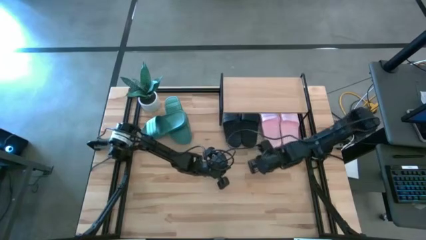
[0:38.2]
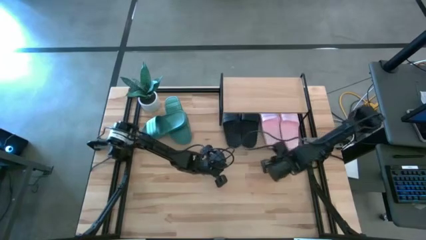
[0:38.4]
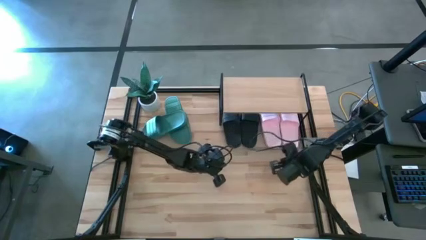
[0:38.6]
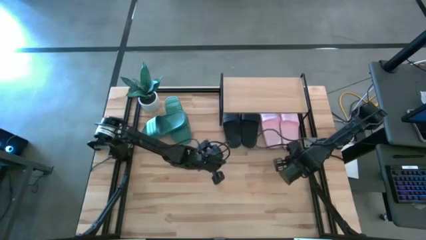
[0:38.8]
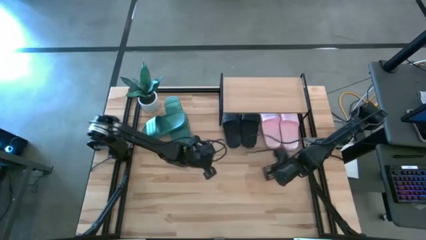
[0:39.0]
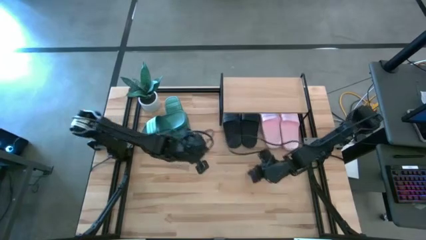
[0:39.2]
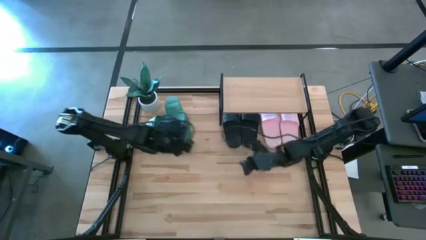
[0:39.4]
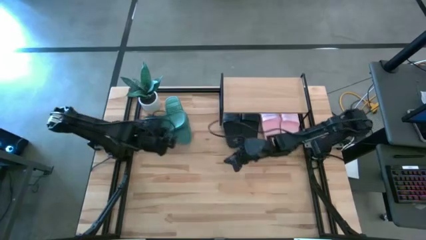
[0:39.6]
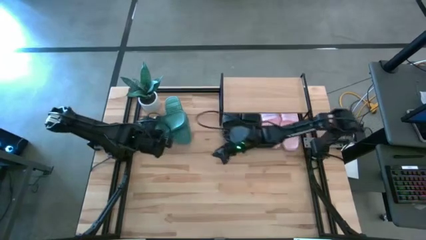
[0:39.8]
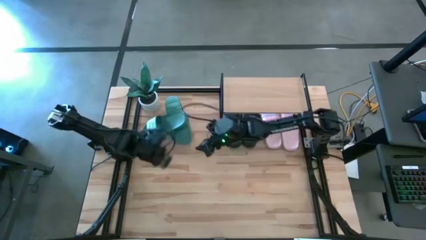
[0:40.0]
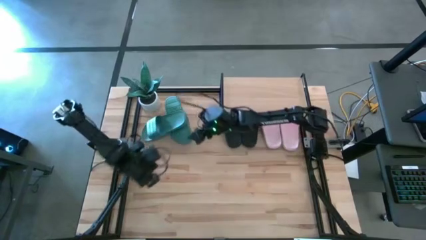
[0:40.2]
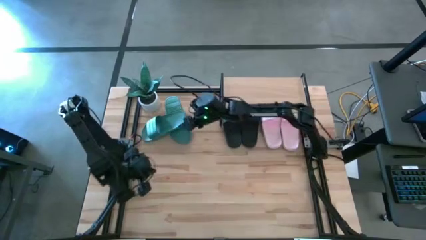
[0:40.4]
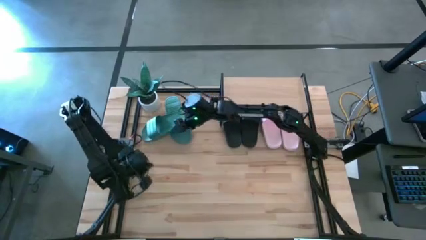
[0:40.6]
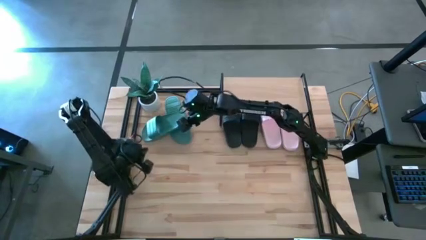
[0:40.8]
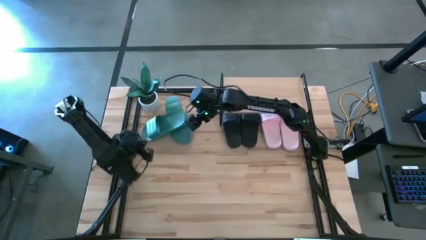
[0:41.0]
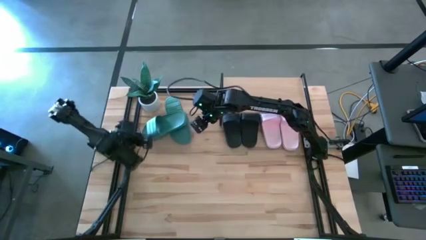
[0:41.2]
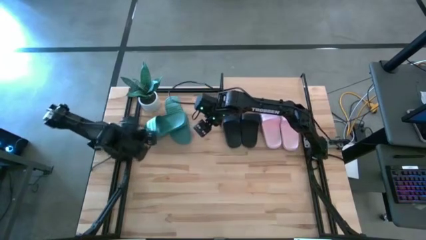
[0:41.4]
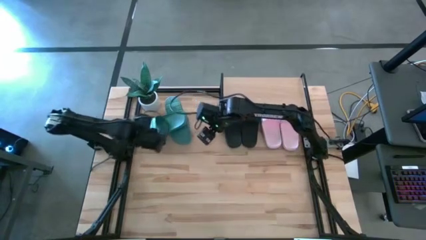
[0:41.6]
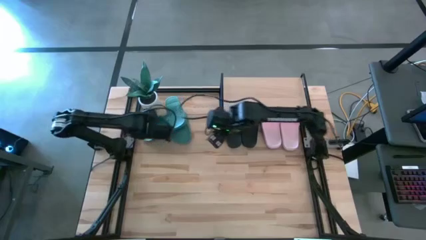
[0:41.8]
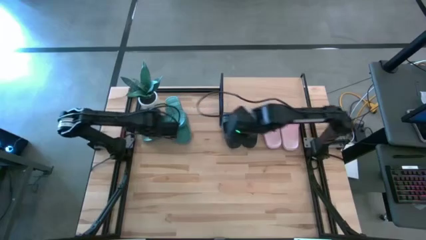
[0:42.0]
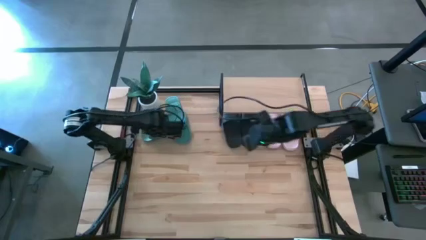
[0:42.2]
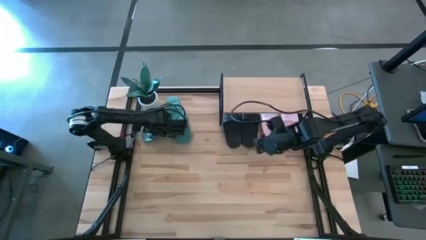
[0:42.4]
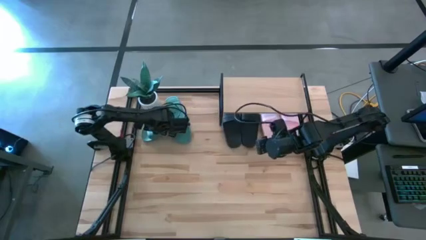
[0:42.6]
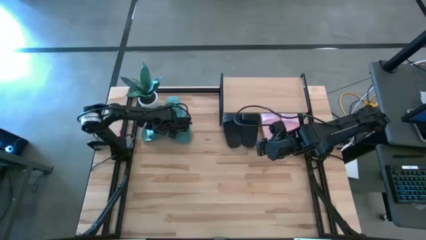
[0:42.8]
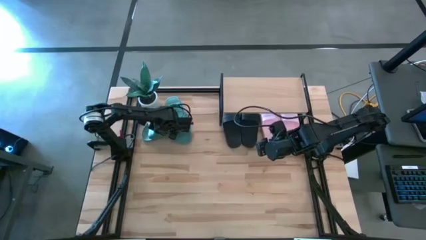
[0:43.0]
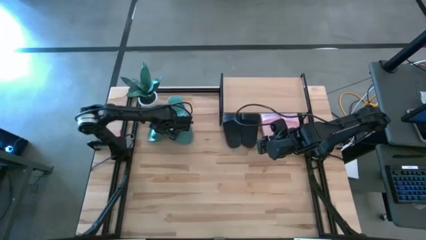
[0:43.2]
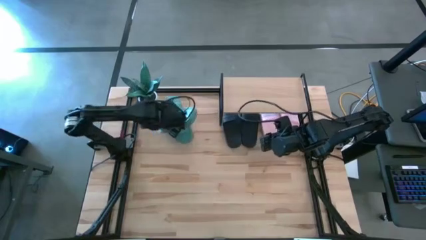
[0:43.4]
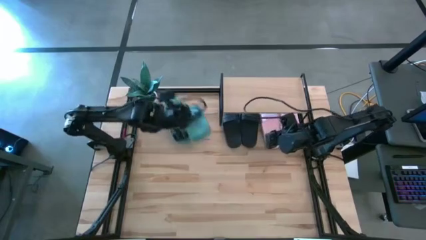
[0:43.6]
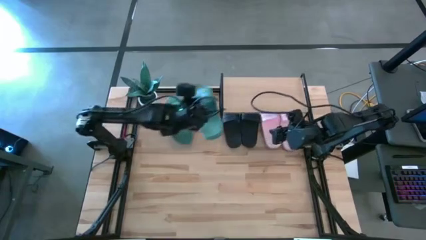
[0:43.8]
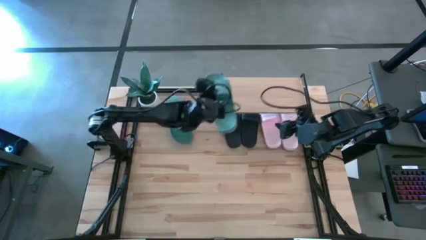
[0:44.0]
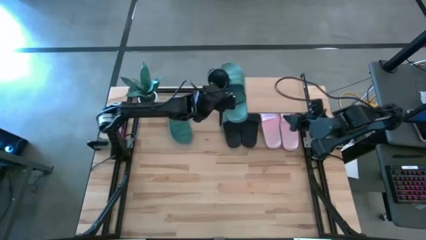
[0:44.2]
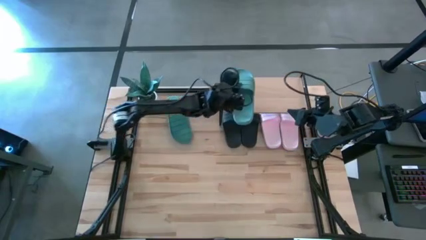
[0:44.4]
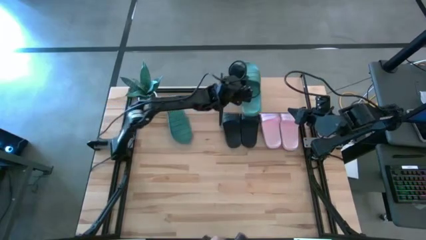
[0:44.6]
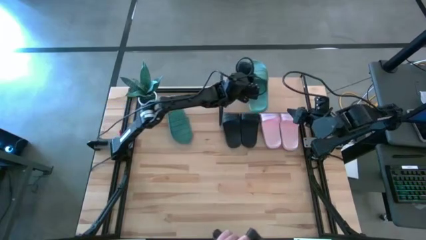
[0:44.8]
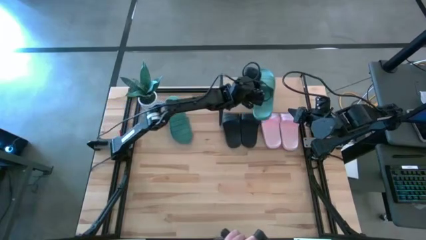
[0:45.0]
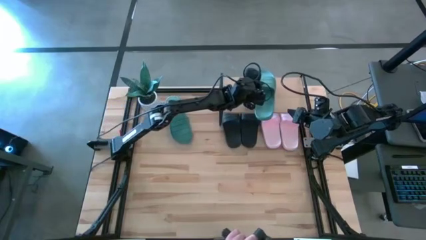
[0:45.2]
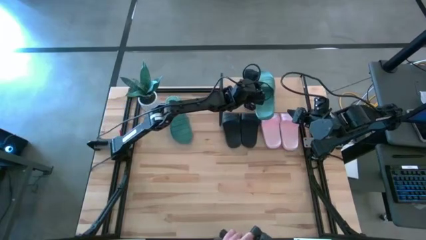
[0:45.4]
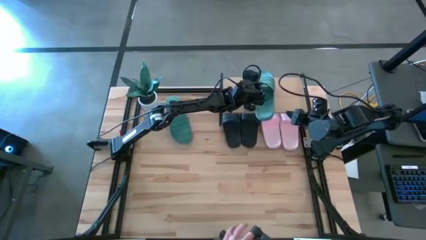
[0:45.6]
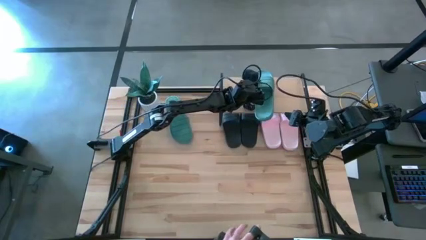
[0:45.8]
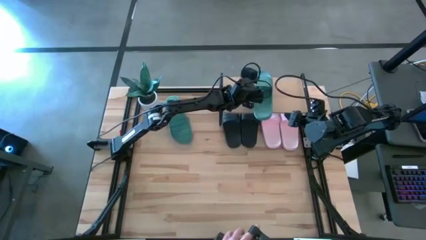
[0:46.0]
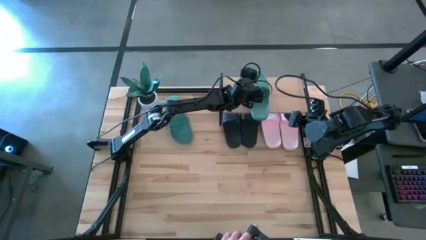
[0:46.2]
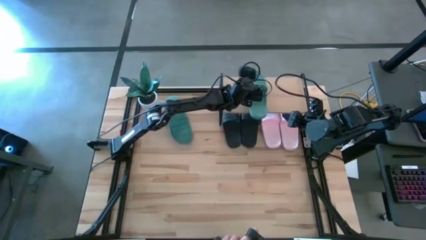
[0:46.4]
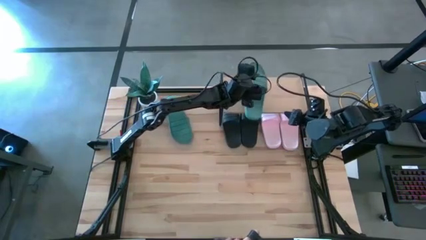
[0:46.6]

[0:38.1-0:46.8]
Task: Pick and place slides into the shelf
Put the left green slide on the shelf

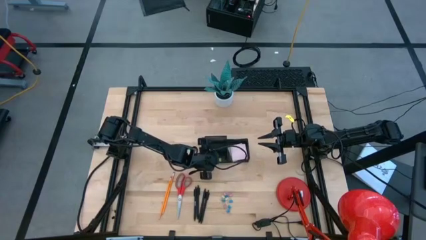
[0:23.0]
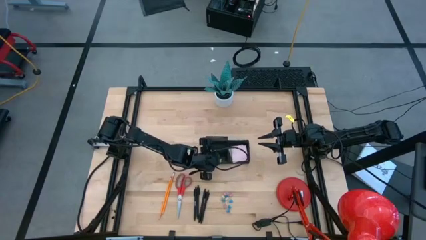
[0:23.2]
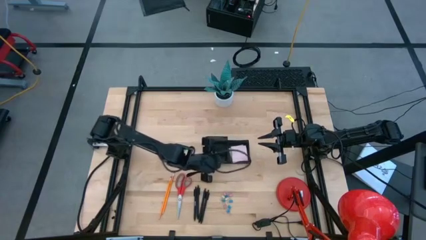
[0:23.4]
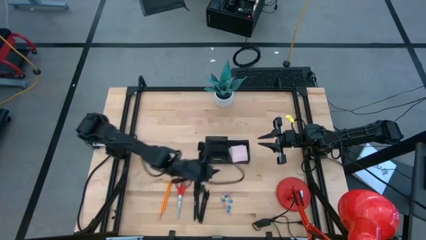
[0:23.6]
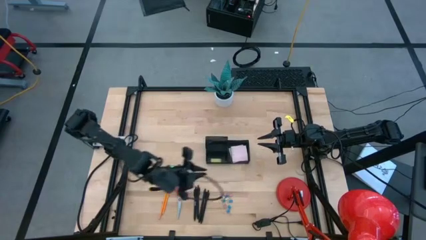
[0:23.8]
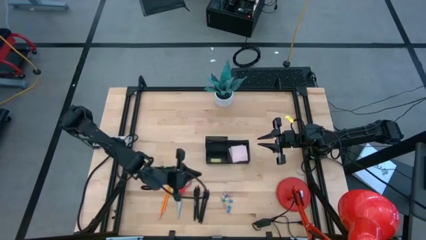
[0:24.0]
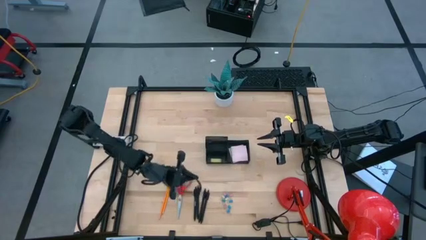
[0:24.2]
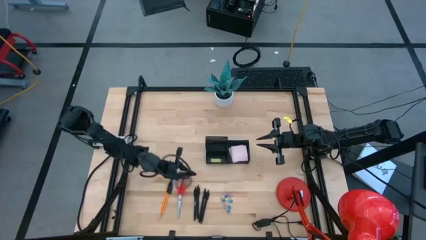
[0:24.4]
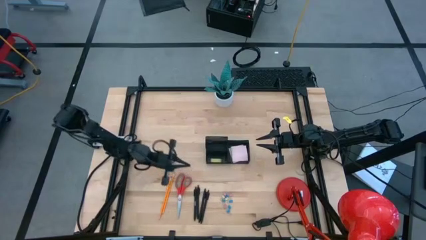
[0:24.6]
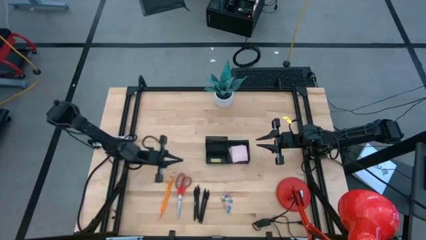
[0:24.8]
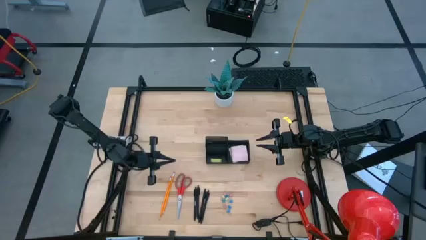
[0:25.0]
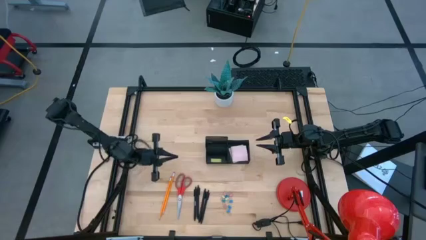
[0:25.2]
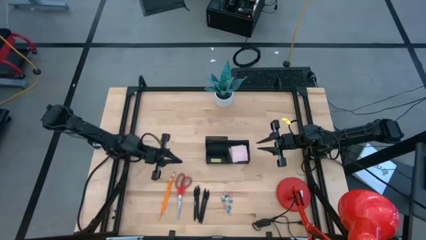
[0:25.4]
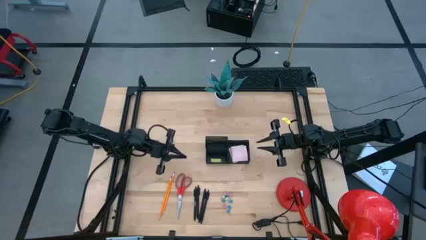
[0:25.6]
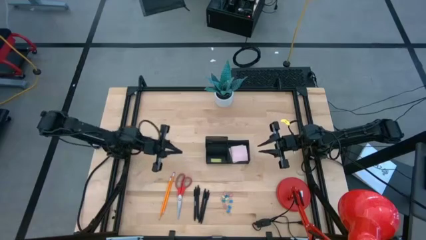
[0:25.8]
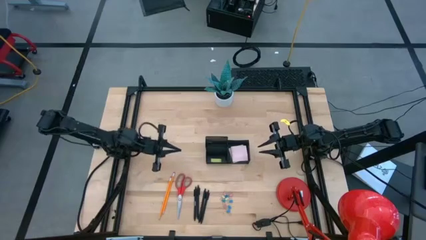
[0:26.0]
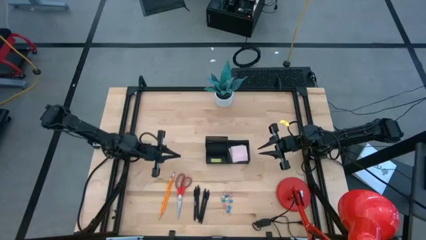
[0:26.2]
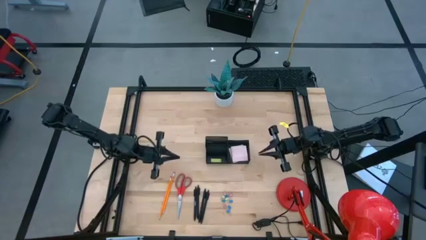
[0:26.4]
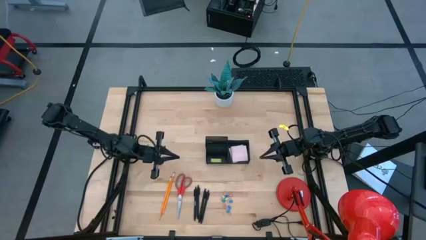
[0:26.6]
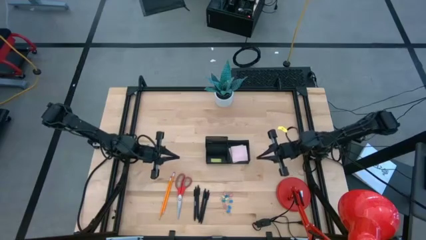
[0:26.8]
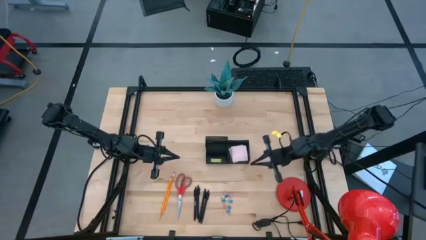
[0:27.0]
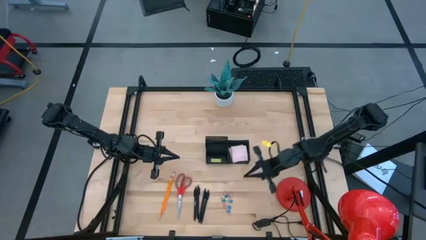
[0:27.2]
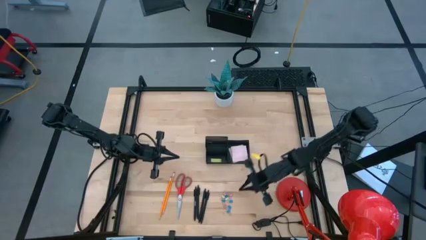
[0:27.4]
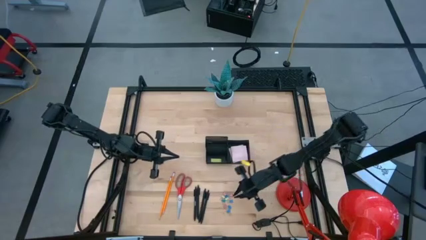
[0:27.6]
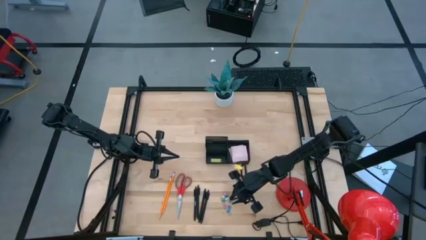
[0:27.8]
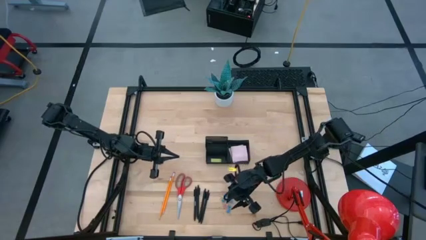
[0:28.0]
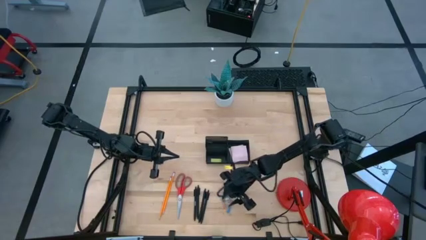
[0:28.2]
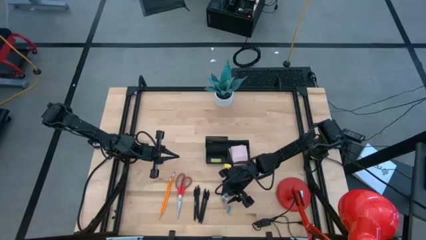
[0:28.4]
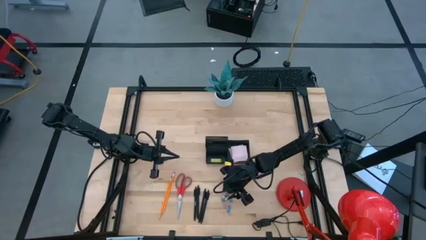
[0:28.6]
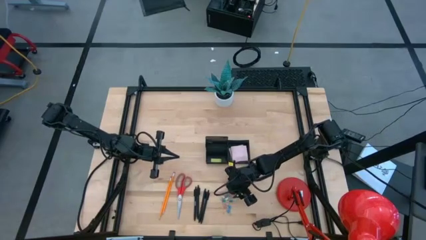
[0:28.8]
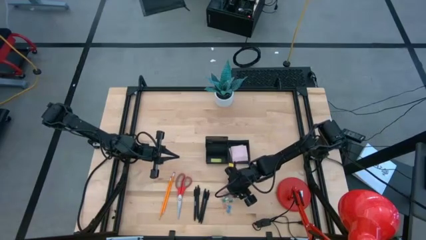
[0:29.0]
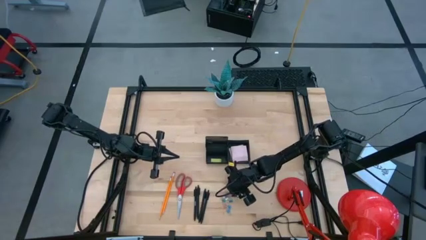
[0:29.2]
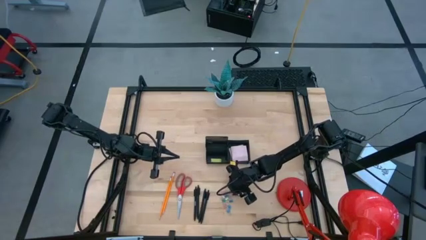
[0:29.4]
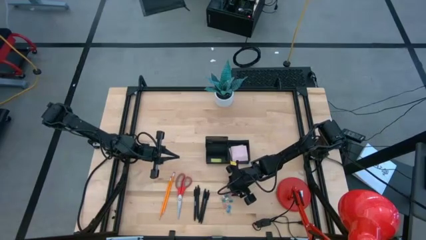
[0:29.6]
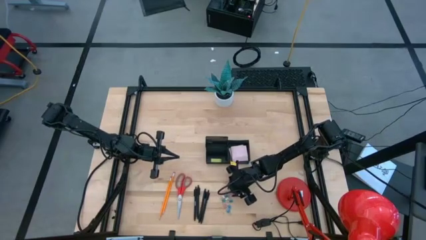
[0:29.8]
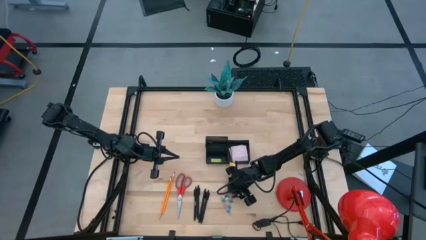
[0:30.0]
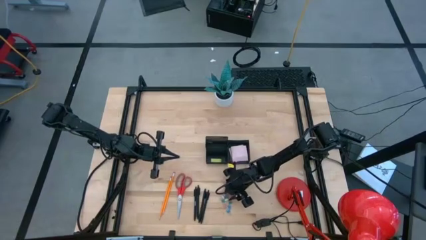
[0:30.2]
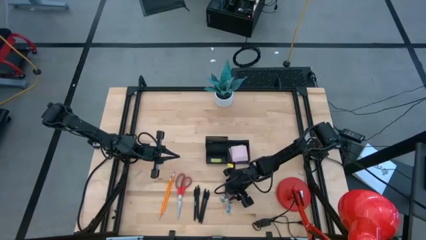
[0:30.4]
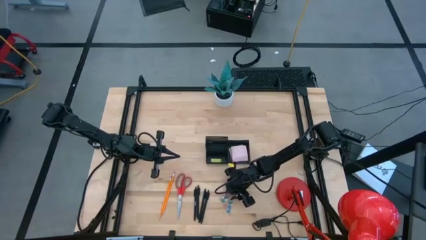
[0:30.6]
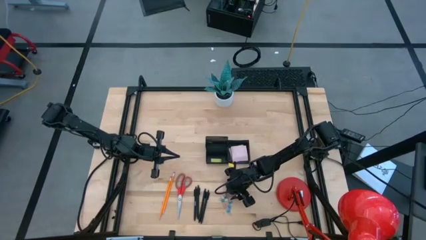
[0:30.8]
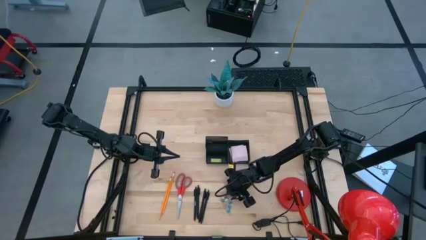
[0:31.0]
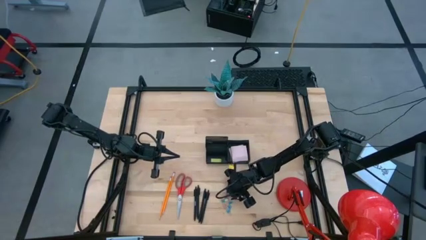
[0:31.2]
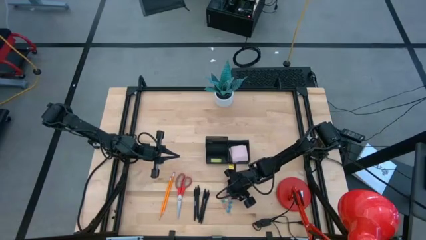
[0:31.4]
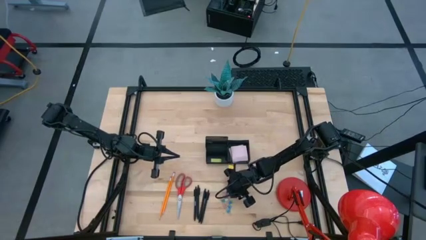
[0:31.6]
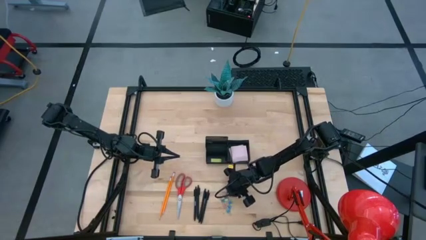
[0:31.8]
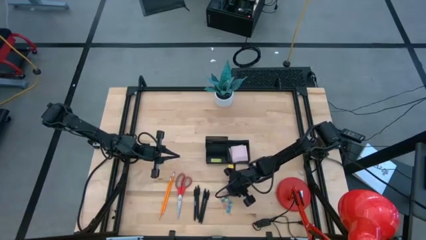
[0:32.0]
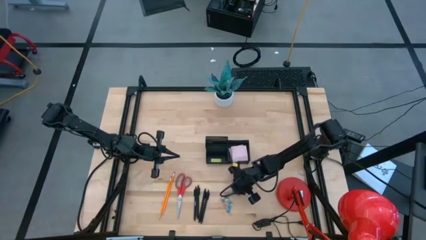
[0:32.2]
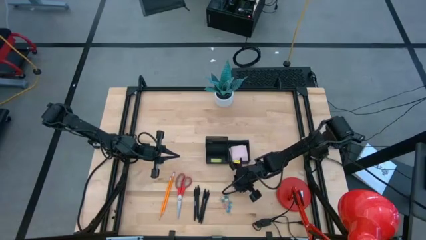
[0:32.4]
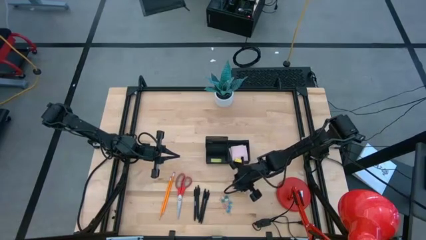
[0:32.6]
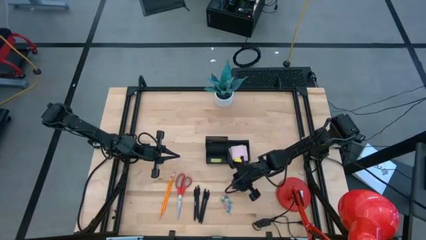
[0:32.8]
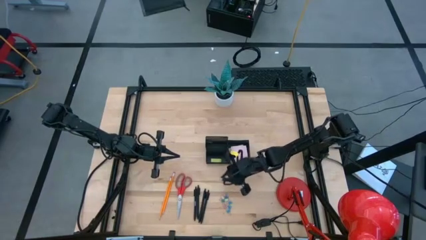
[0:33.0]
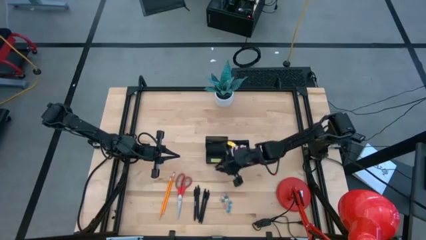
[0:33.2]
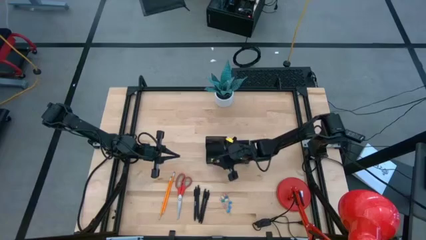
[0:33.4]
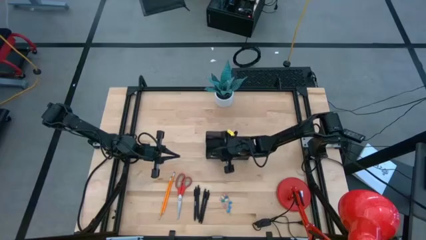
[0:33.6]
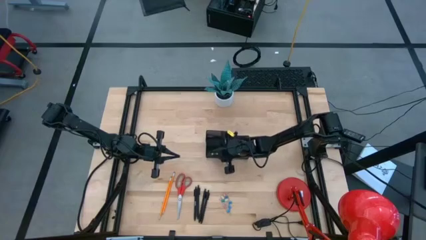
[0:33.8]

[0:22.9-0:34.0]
Task: Pick and place office supplies into organizer
Put the pink binder clip into the black desk organizer
